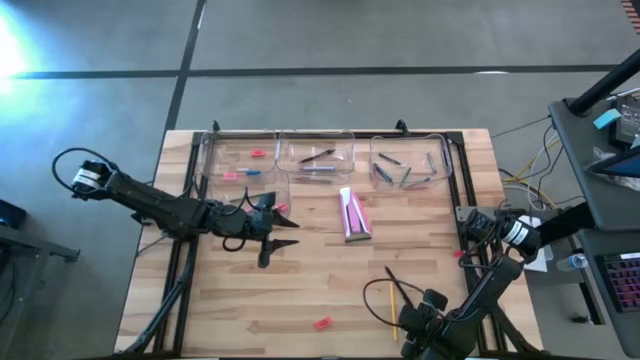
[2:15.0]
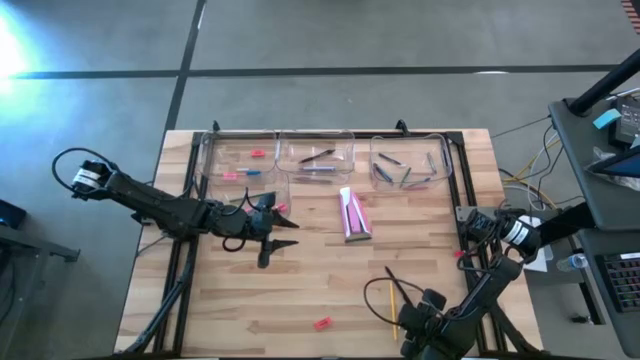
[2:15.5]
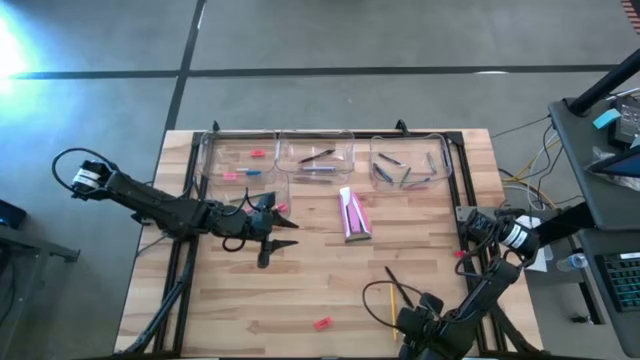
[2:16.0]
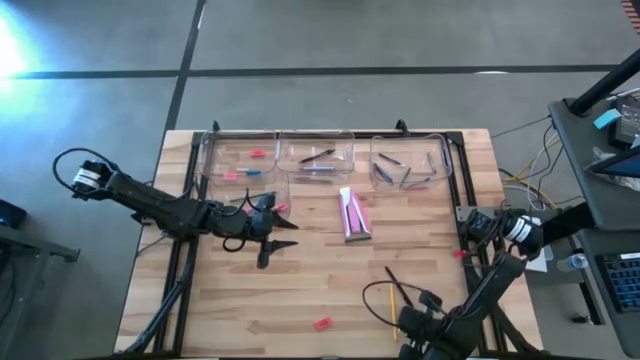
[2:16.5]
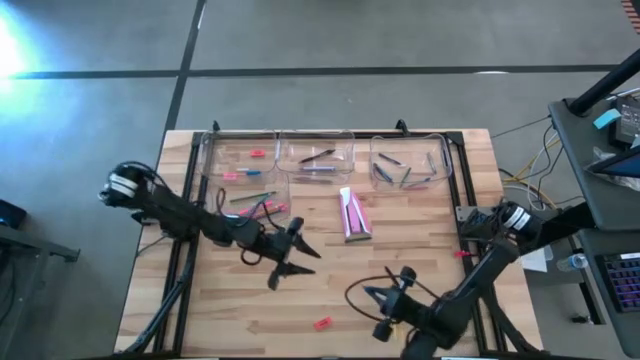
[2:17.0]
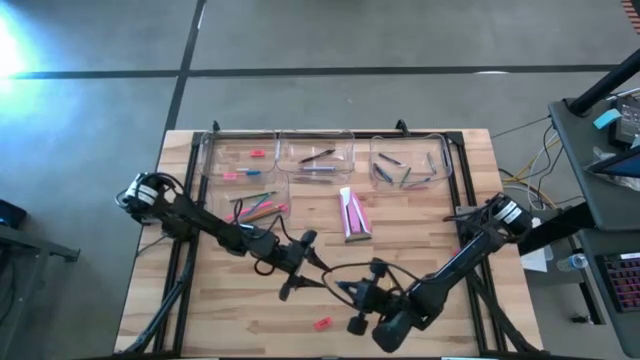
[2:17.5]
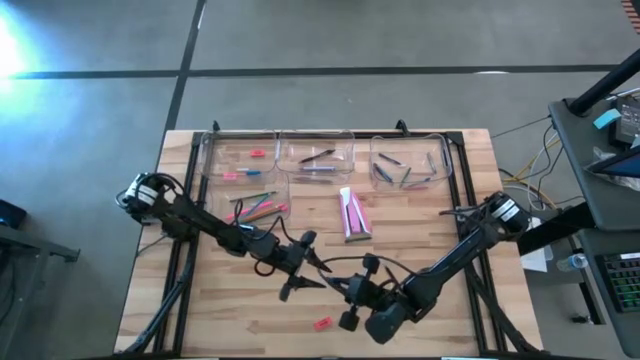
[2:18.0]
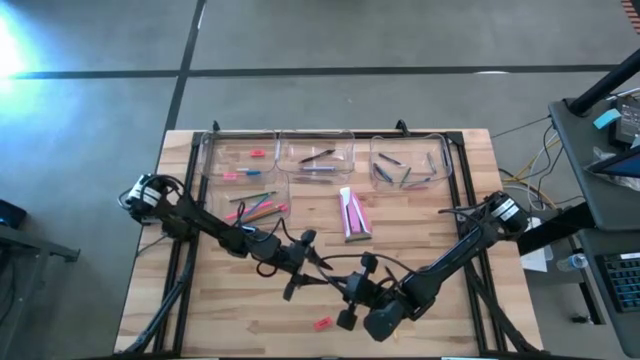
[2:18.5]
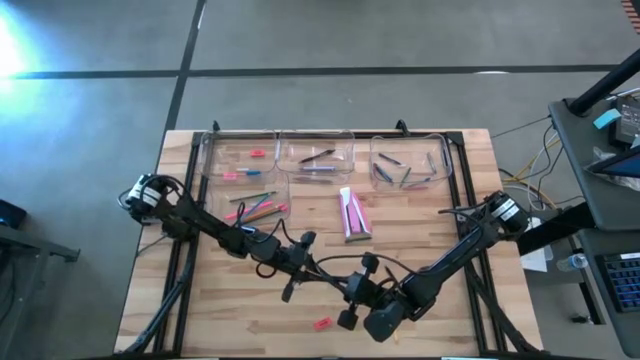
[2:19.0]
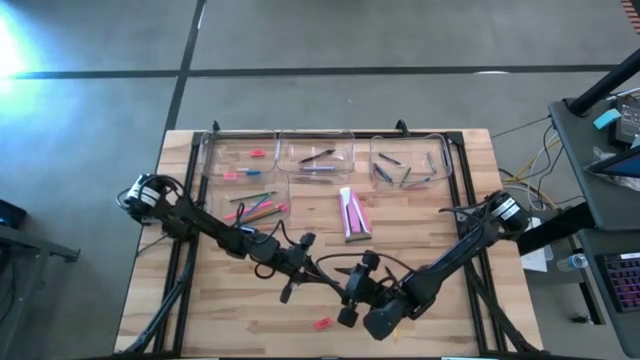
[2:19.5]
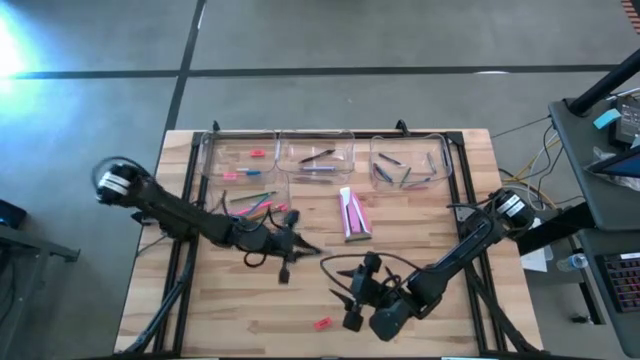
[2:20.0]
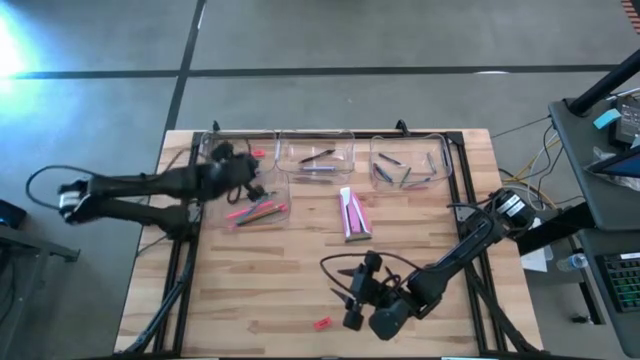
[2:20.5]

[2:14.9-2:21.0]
Task: Sort crayons/erasers/pens/pencils in bins
Put the blue eraser into the top left transparent bin

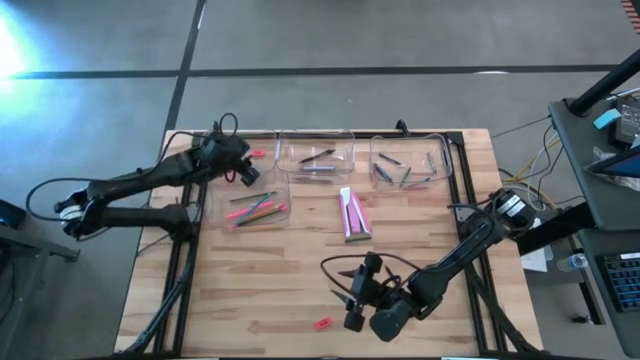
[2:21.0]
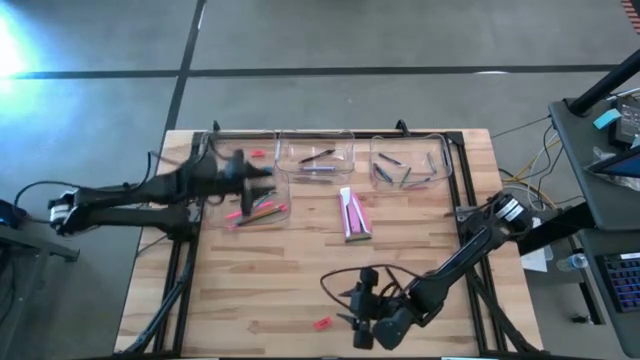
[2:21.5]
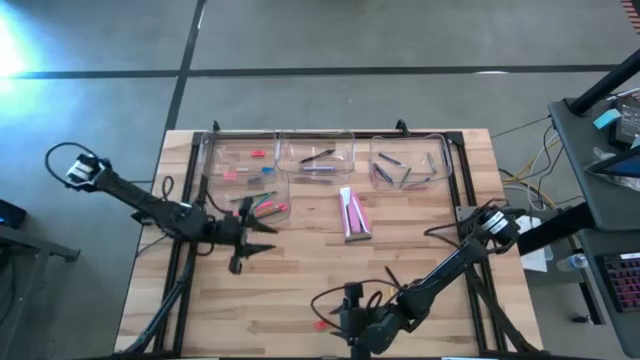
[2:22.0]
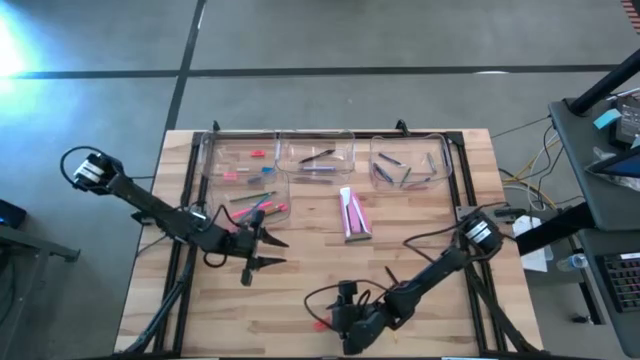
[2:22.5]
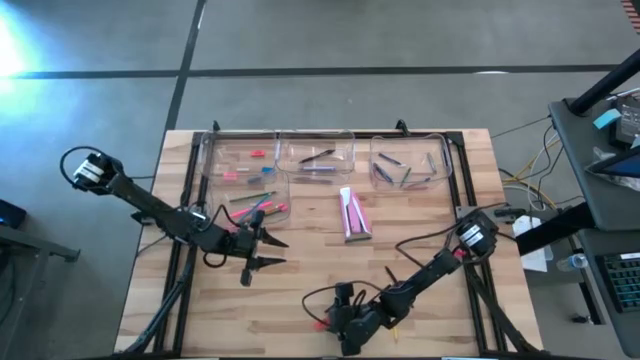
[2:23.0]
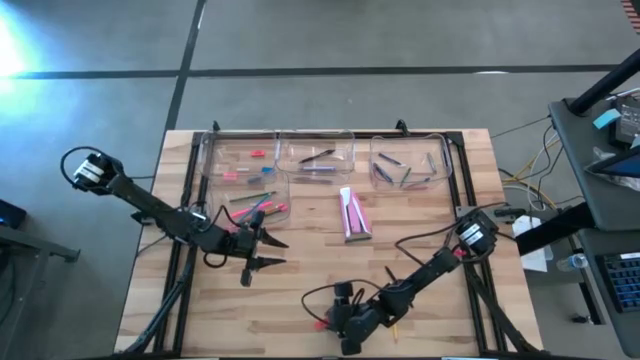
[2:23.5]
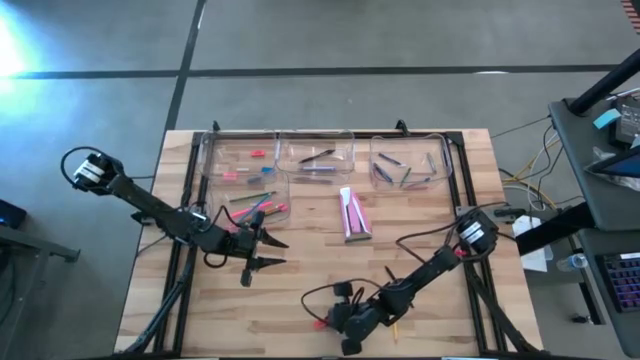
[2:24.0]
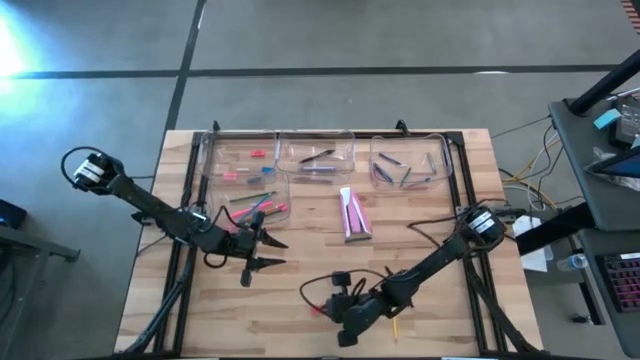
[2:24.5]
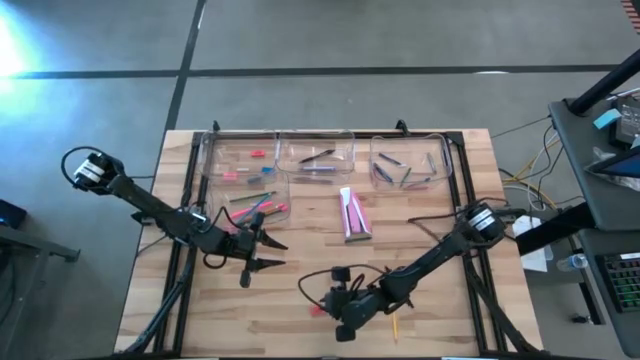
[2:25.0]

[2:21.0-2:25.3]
Put the orange eraser into the top left transparent bin

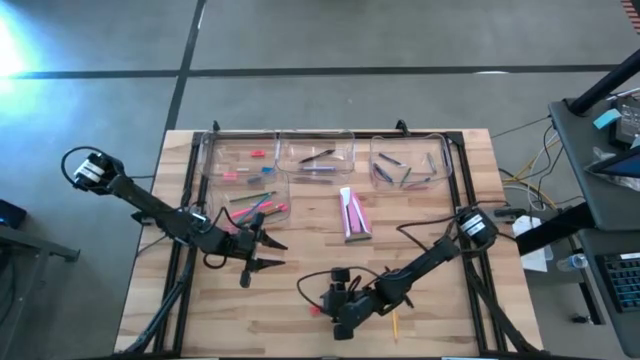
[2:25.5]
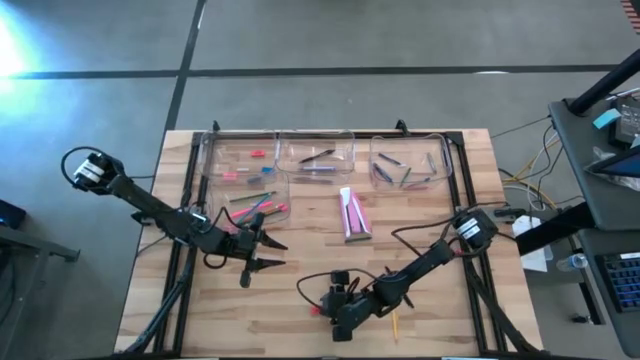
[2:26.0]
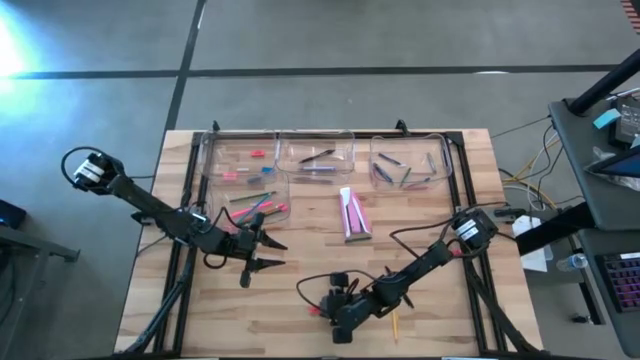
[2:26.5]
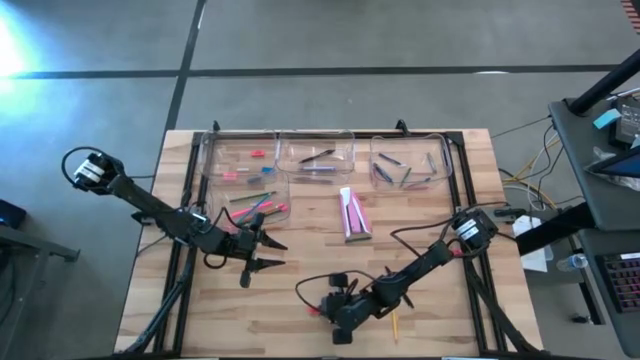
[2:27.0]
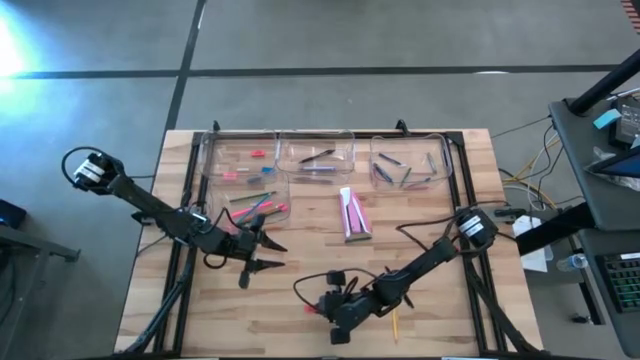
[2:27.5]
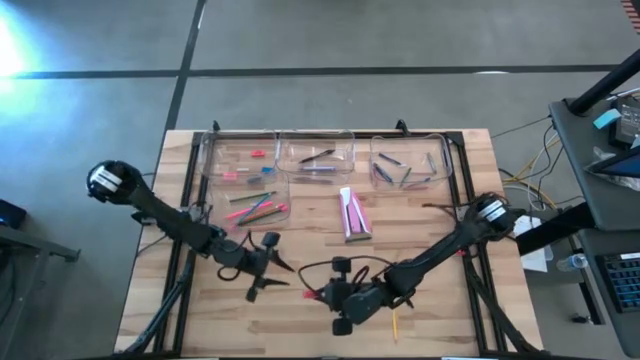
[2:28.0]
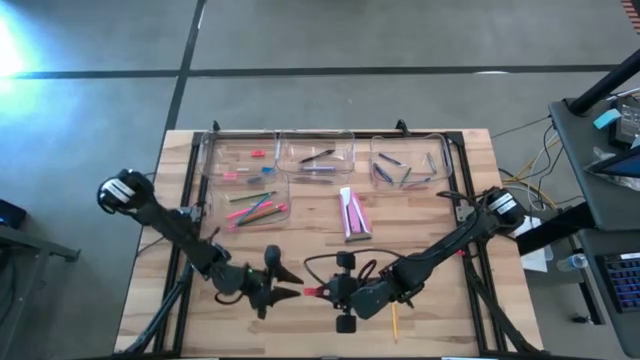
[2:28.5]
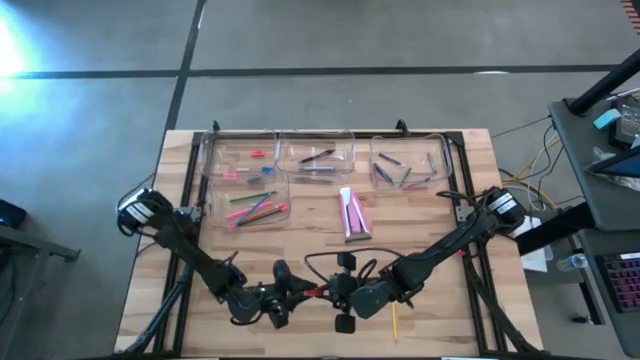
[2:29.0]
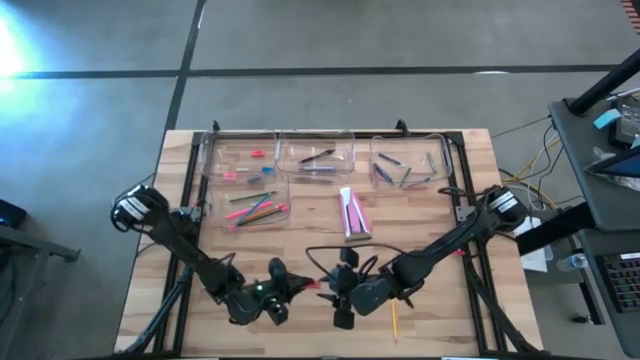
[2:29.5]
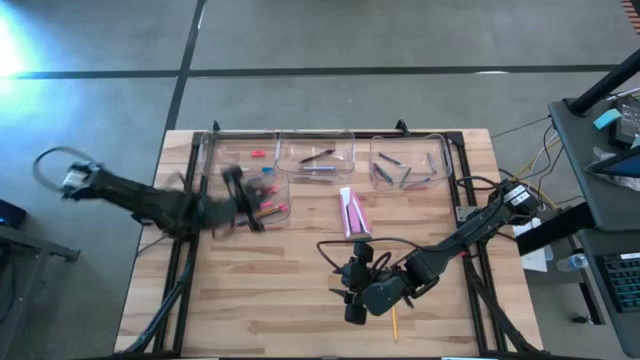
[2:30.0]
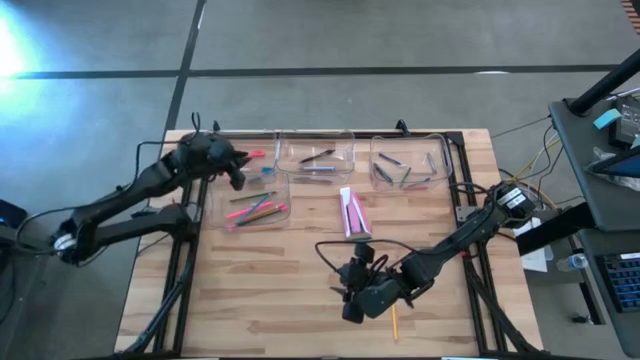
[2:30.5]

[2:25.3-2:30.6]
Put the orange eraser into the top left transparent bin

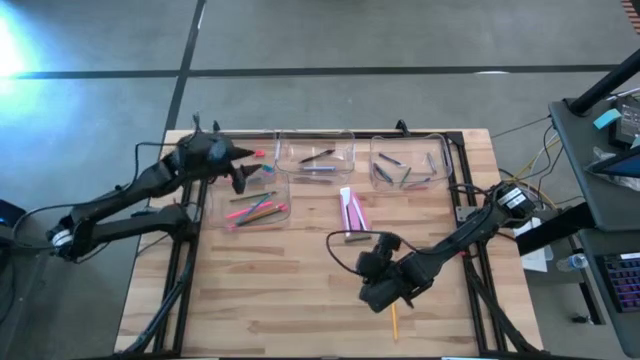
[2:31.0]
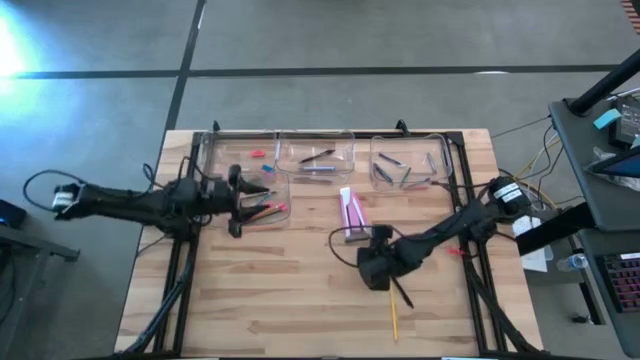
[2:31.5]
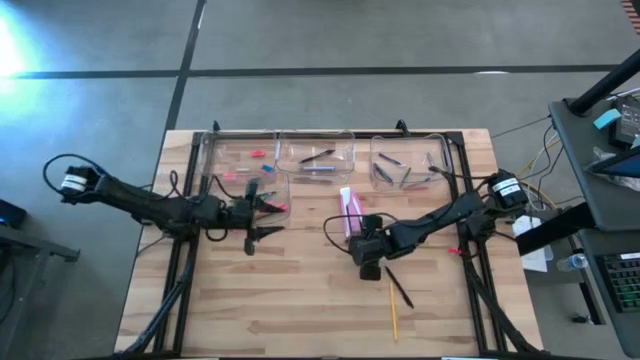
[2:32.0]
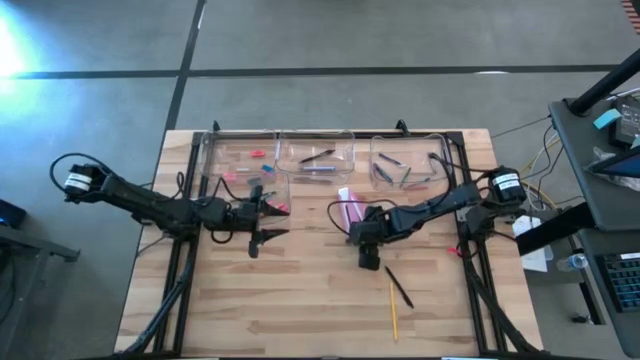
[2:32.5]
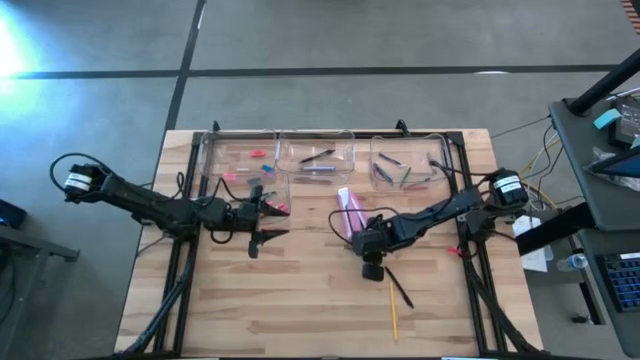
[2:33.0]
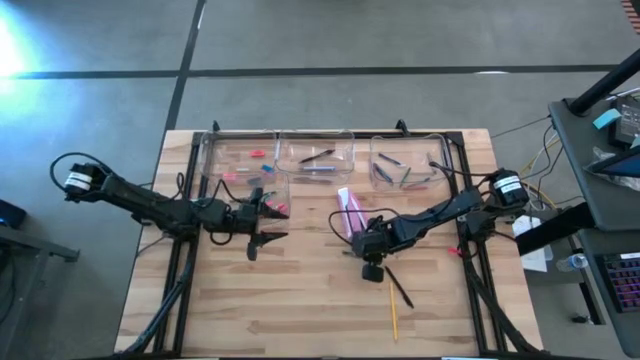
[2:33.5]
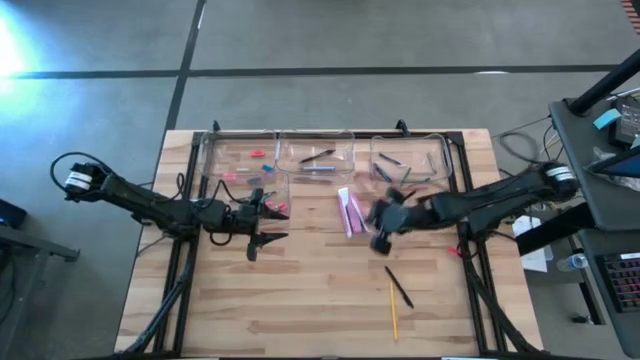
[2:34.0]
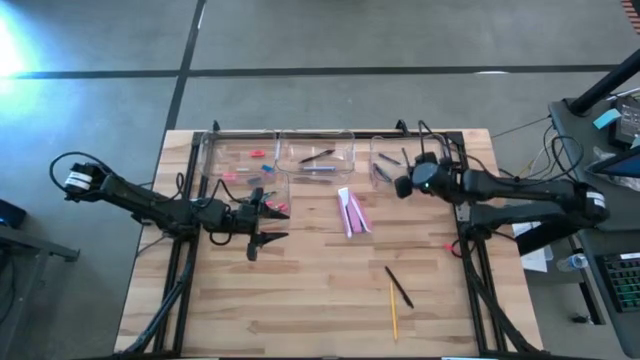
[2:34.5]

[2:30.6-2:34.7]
Put the green crayon into the top right transparent bin
